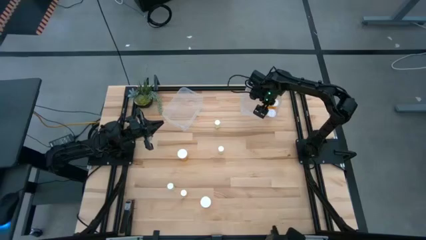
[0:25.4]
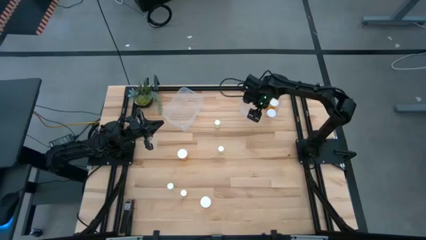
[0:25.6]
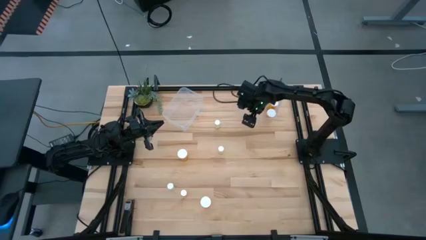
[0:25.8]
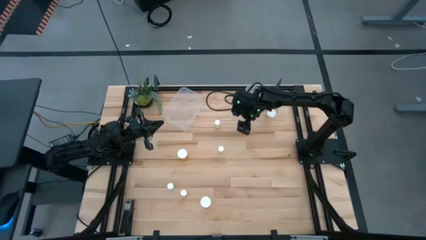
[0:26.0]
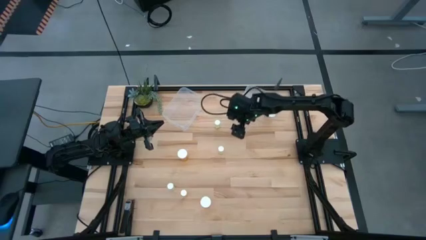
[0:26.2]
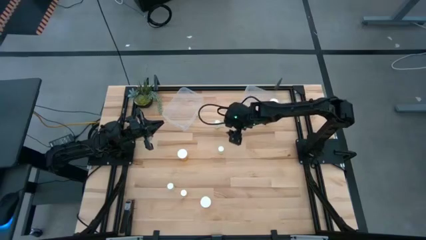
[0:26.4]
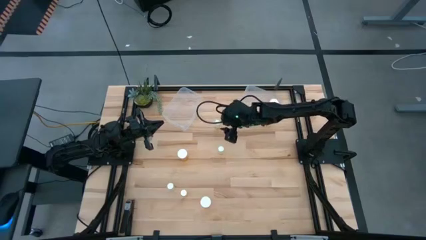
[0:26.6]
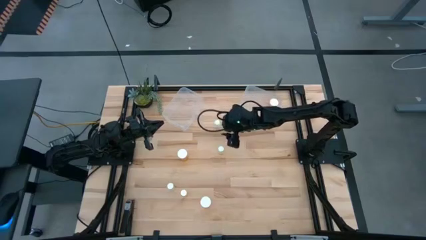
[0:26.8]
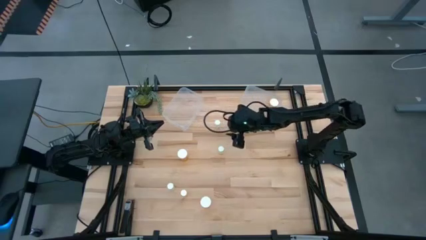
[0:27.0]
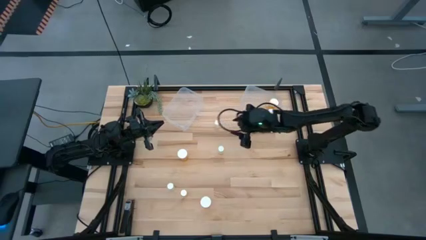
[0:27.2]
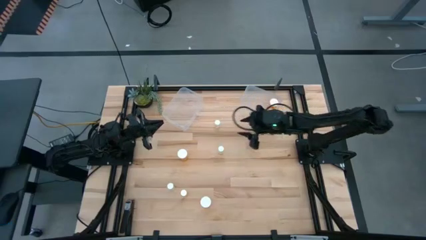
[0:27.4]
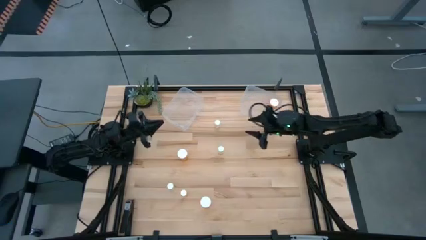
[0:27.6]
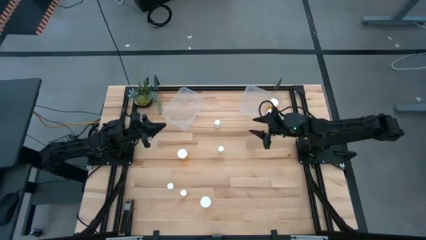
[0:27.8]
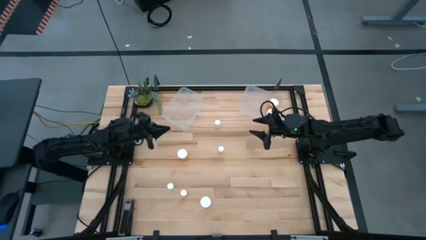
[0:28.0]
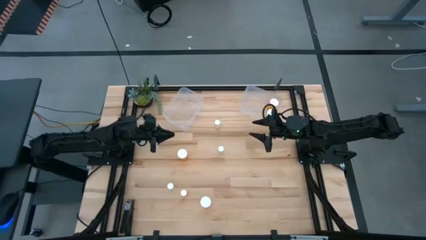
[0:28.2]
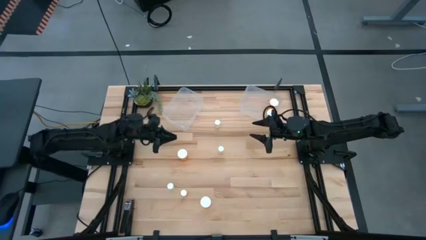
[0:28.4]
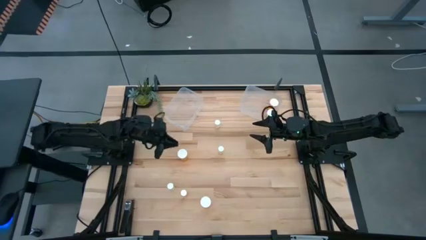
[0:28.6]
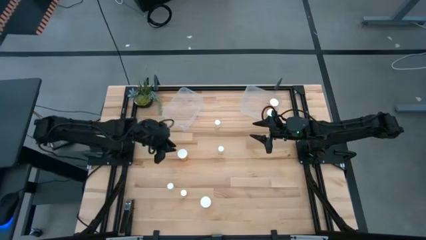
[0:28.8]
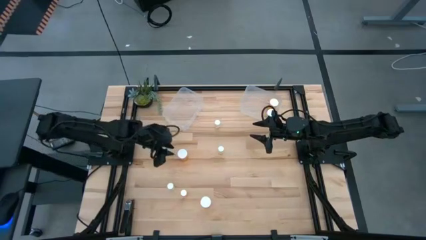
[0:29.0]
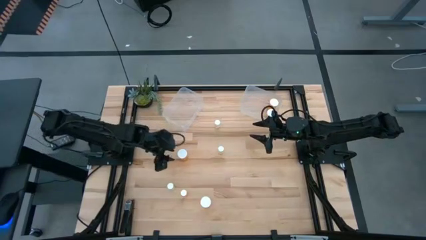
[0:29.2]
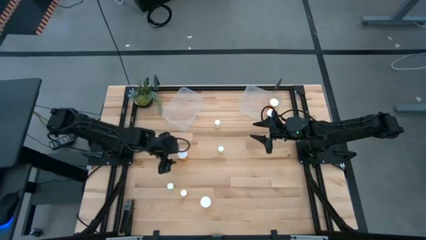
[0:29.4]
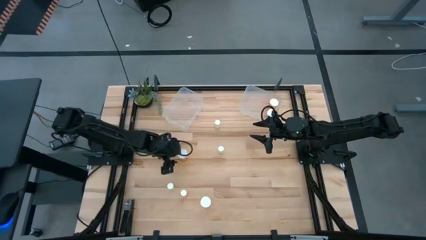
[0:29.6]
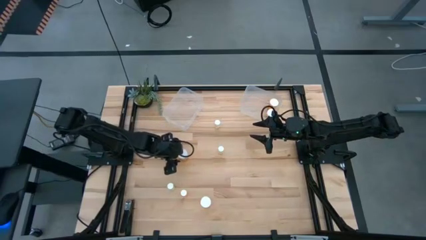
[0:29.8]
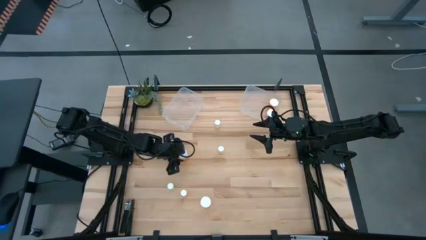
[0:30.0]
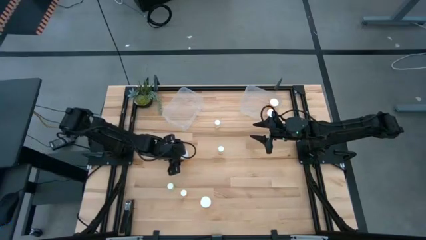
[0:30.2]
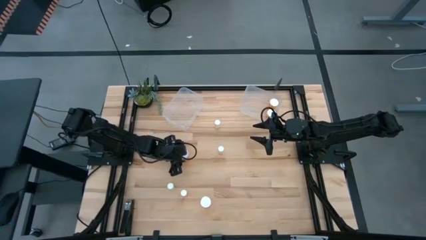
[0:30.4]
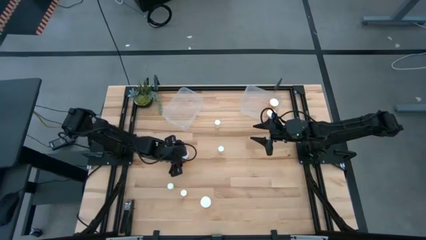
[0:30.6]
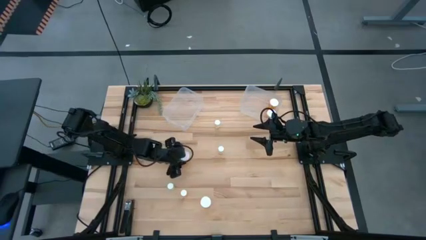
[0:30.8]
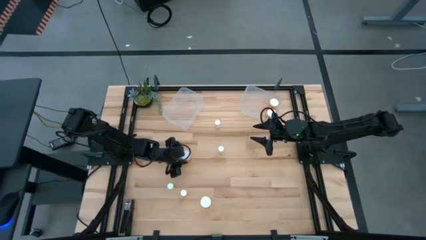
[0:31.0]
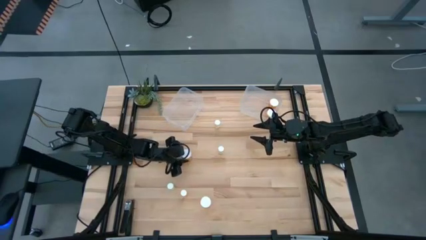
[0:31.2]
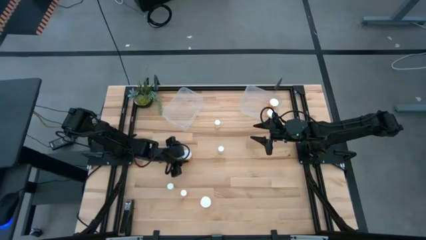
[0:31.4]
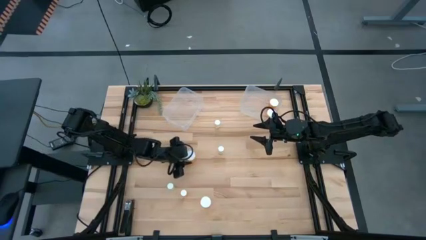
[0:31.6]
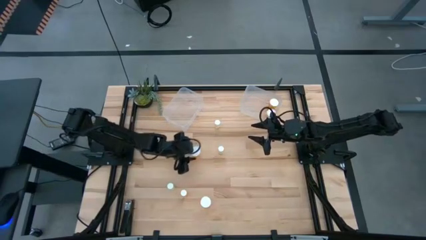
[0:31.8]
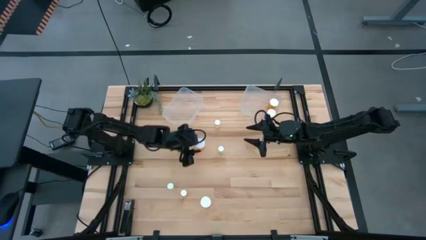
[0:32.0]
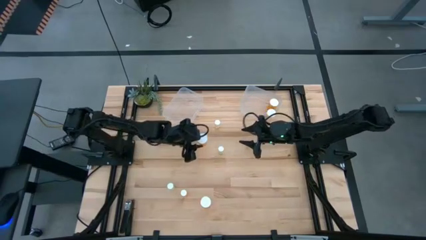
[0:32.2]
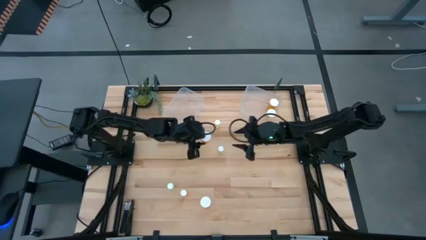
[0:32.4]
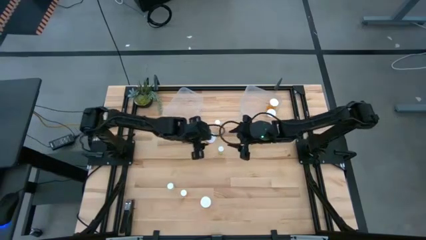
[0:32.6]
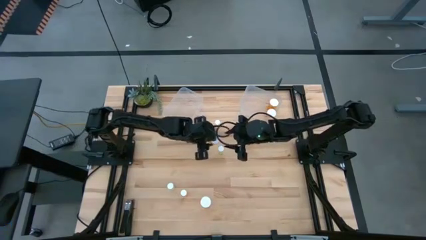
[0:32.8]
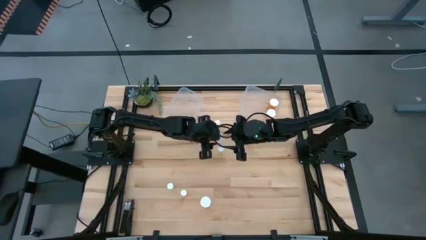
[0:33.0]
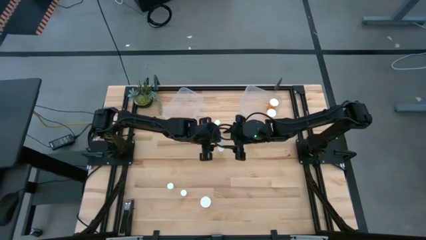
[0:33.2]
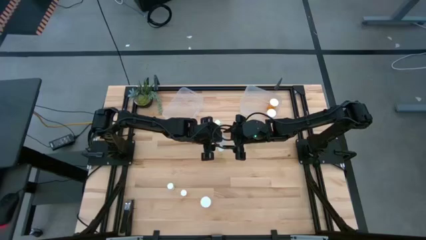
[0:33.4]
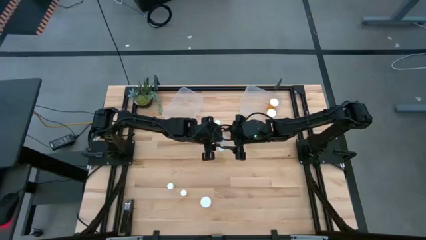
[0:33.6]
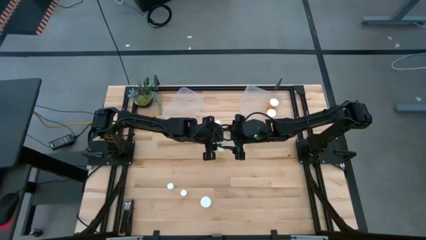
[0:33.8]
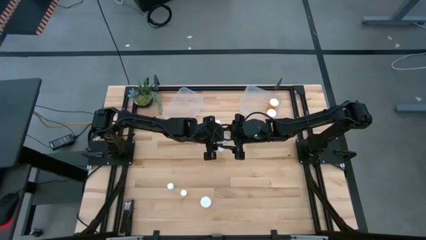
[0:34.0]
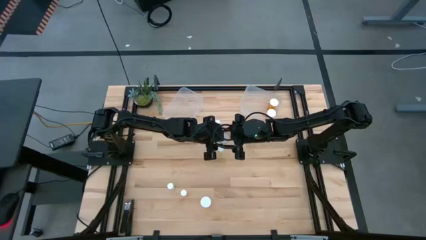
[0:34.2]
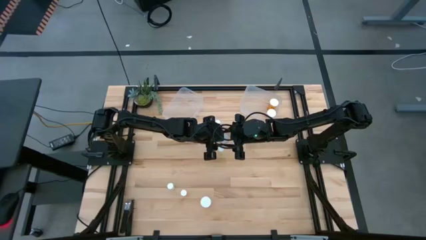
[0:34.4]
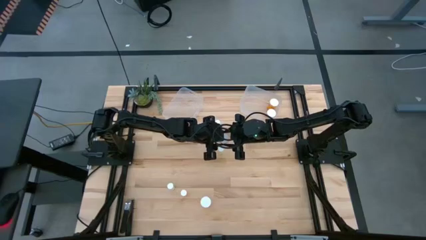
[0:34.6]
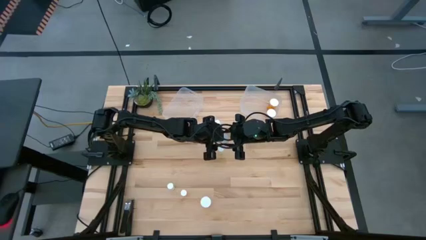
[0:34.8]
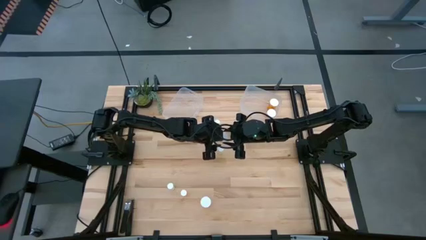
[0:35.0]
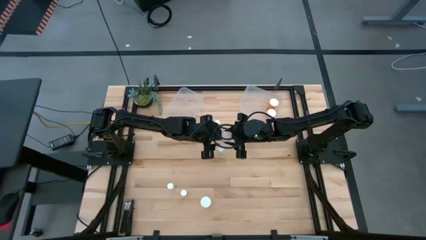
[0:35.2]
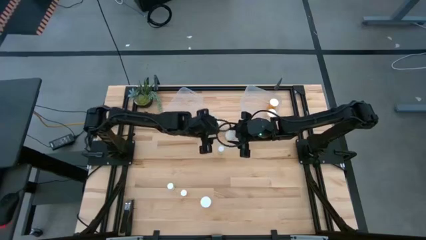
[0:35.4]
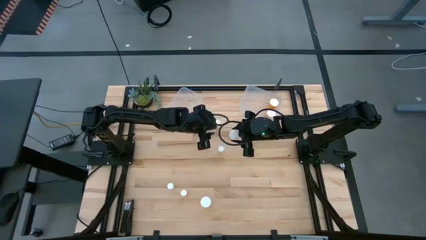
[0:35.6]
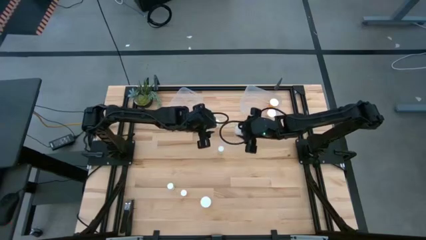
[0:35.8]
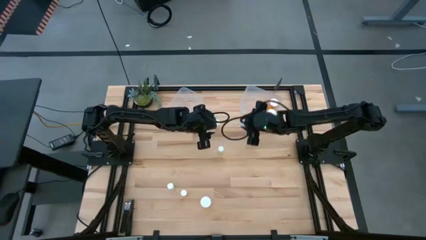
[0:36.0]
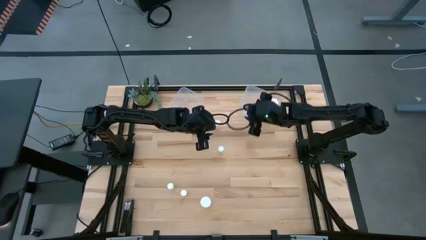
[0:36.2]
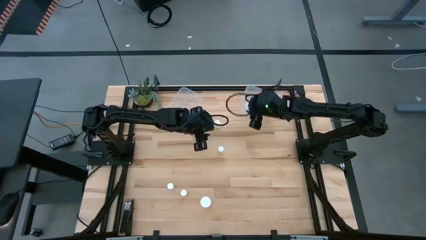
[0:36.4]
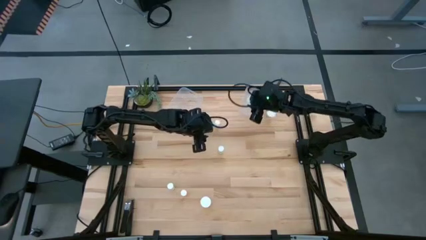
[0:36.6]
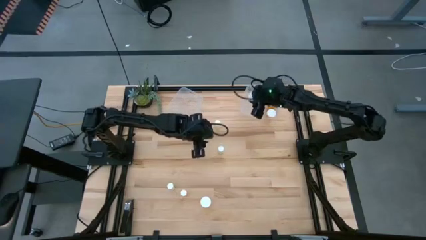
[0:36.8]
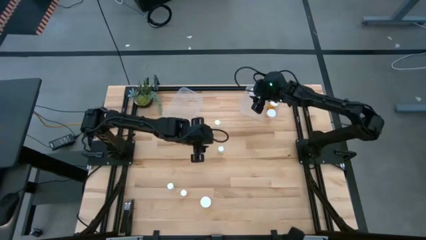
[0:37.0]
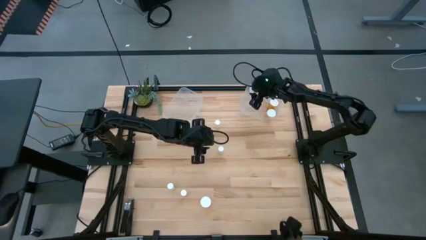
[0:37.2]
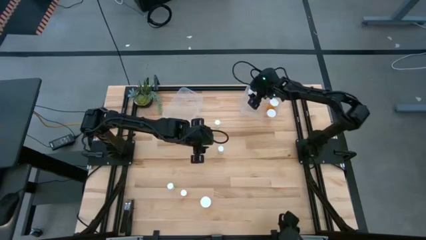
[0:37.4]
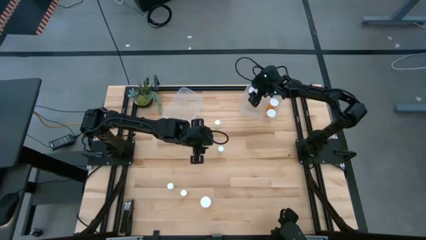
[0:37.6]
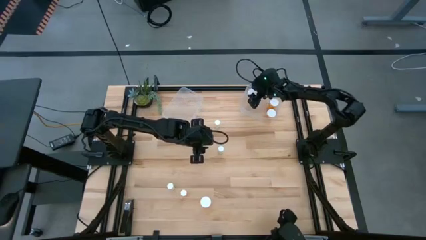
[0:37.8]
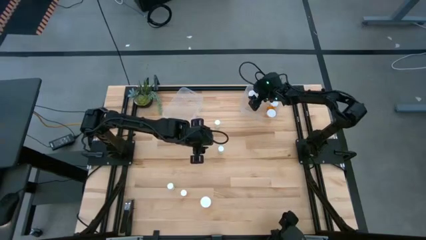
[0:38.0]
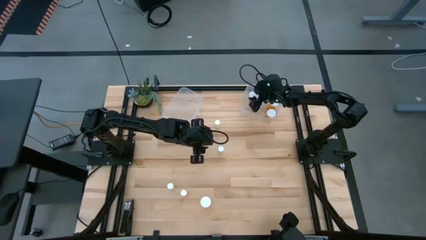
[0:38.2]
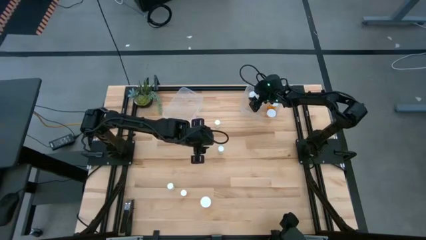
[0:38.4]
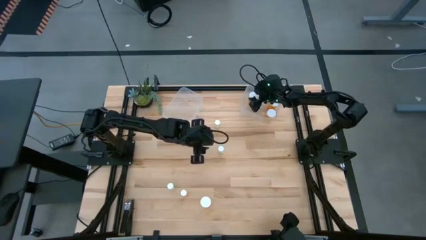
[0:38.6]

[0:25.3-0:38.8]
Task: Pick and place medicine bottles into bin by pill shape (circle, oval)
Put the large orange capsule bottle into the right transparent bin
